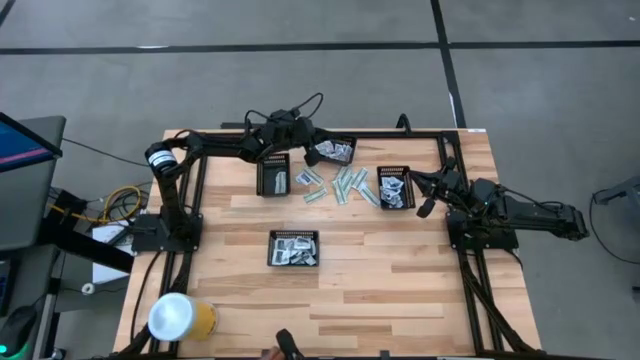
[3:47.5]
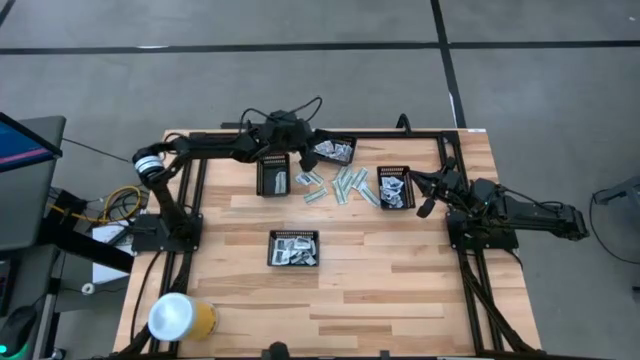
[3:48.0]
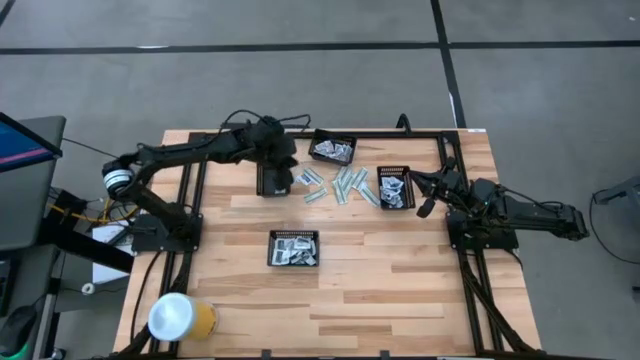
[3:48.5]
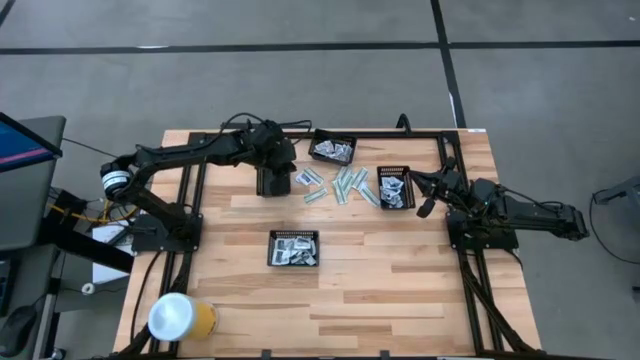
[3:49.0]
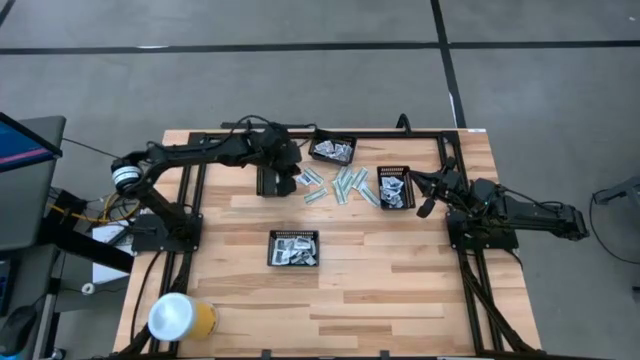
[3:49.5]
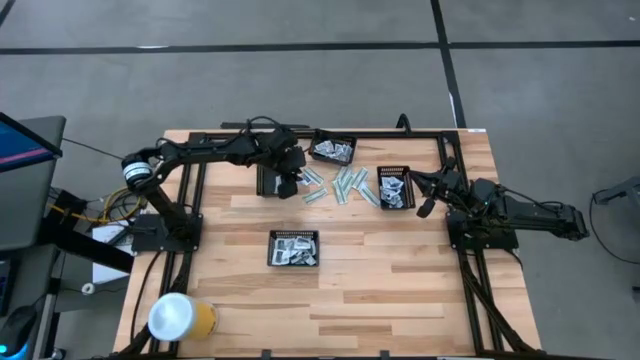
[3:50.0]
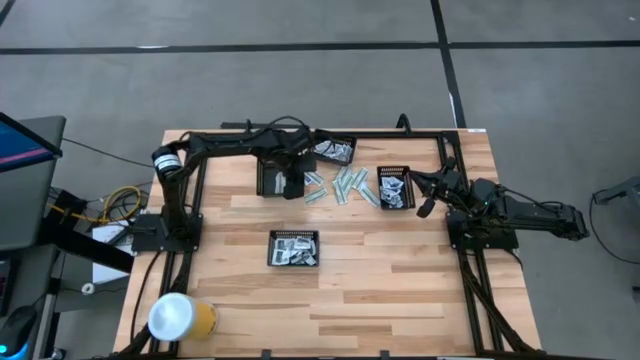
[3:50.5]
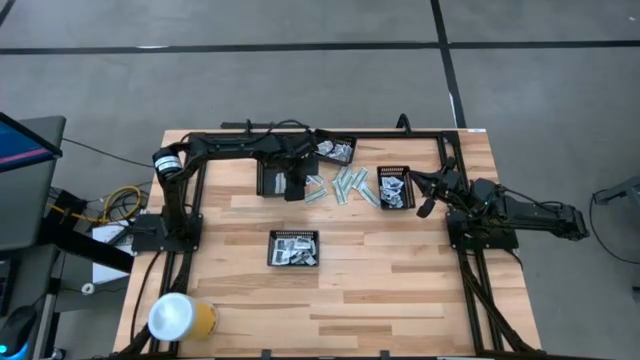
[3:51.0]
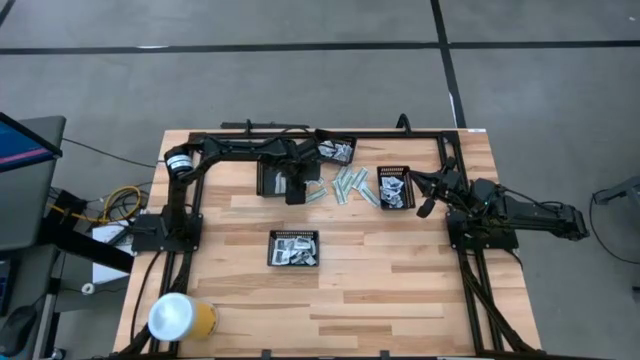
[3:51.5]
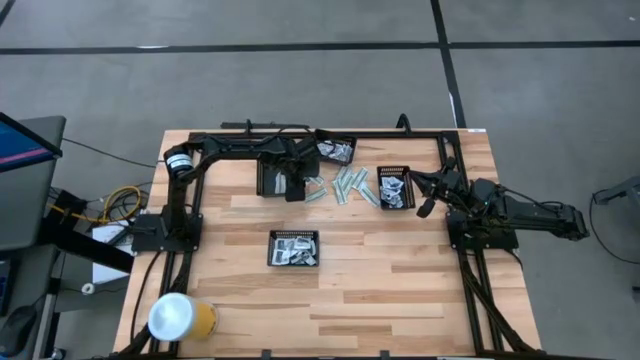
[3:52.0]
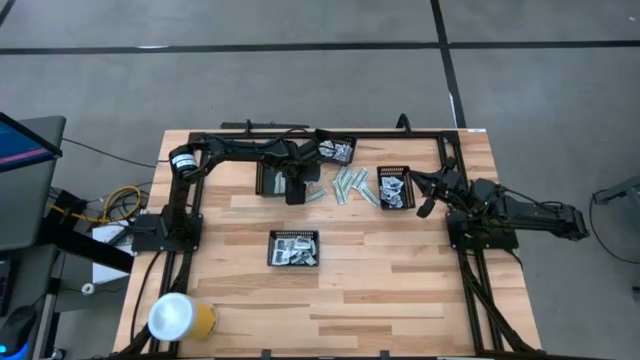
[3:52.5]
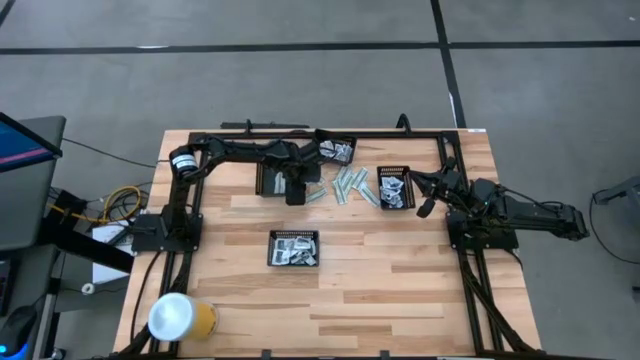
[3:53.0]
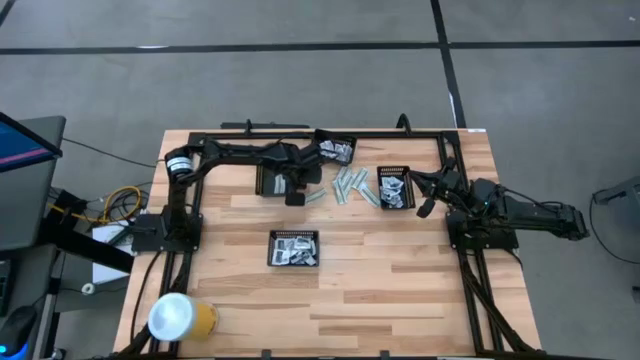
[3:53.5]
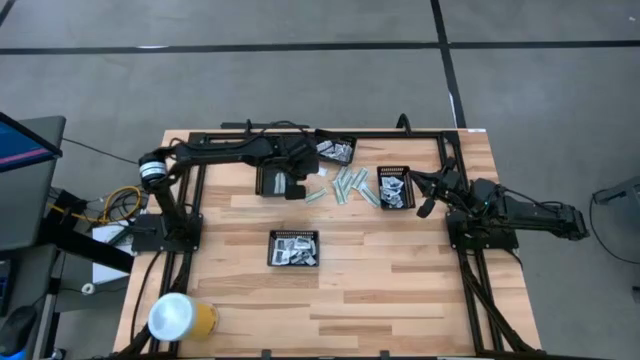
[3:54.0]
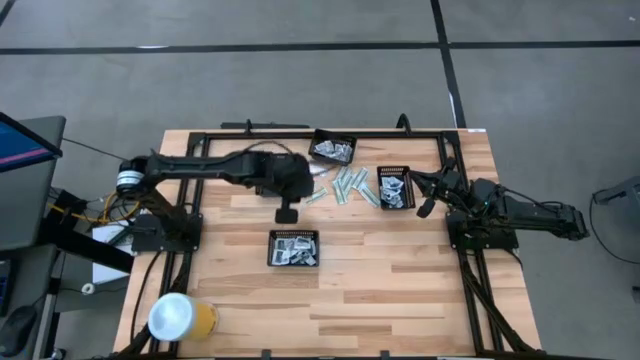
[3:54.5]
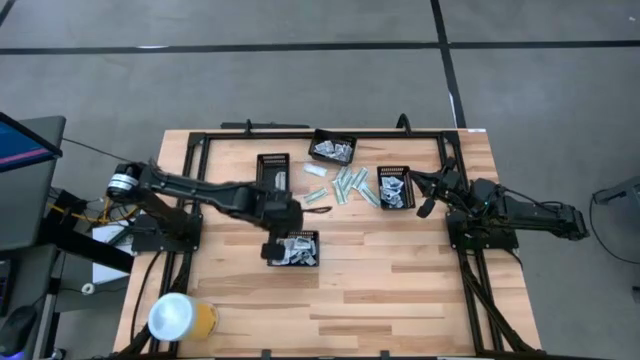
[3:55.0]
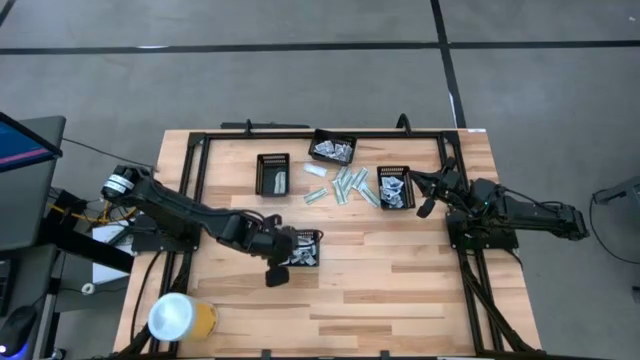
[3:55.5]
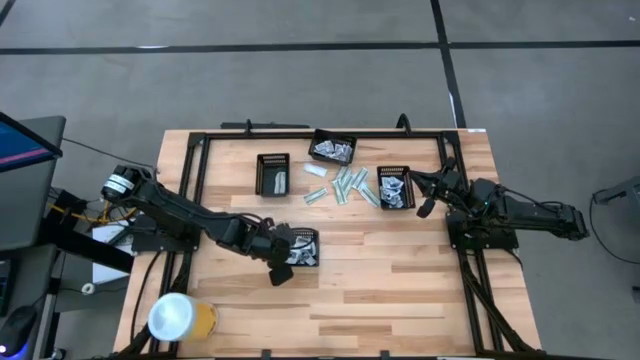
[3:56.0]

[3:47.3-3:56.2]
Task: Pick & Place First Aid Supplies
Put the white towelette pack into the bottom black bin

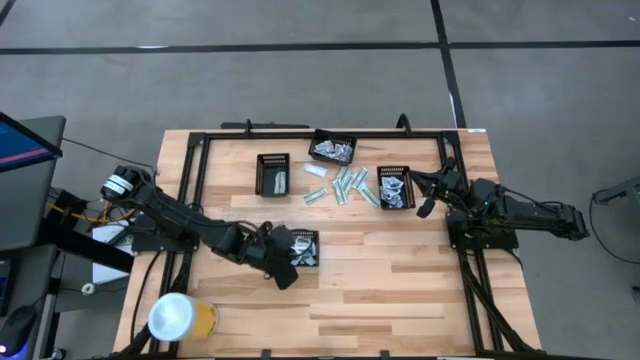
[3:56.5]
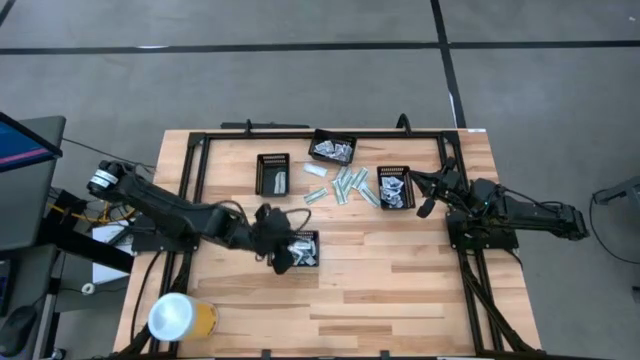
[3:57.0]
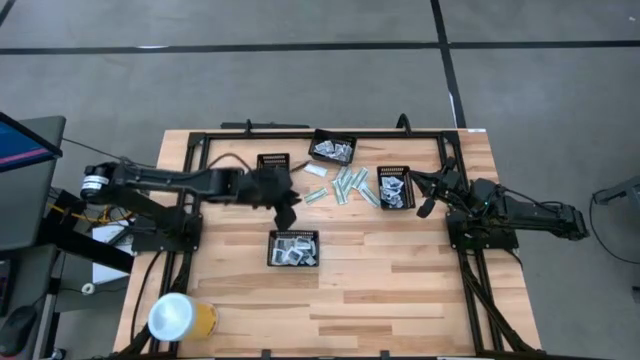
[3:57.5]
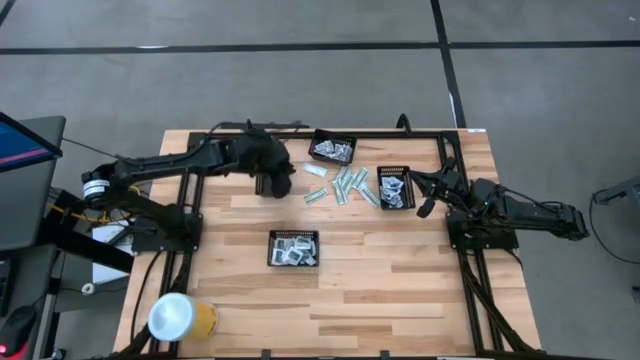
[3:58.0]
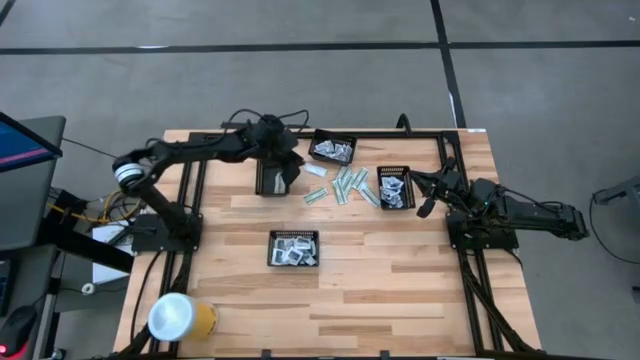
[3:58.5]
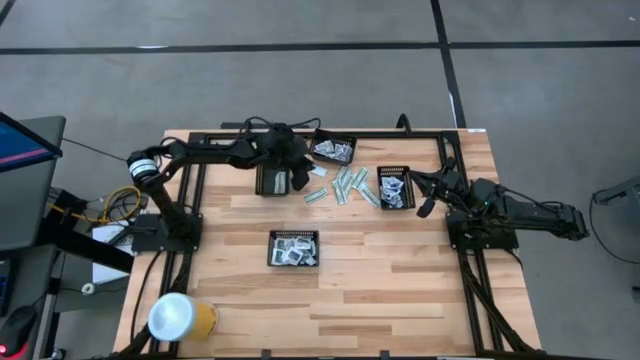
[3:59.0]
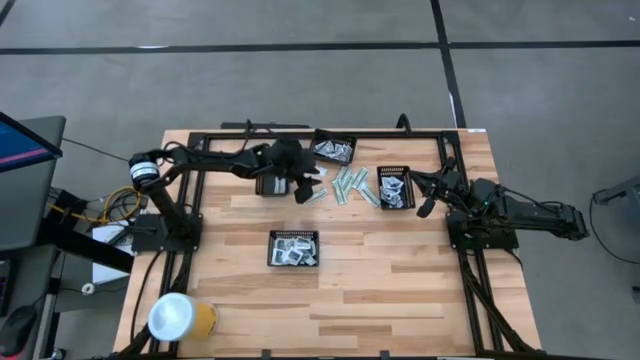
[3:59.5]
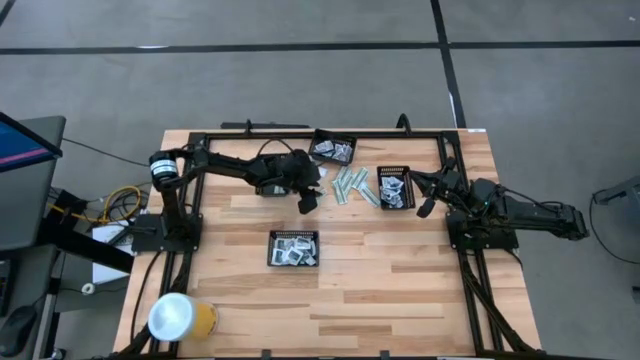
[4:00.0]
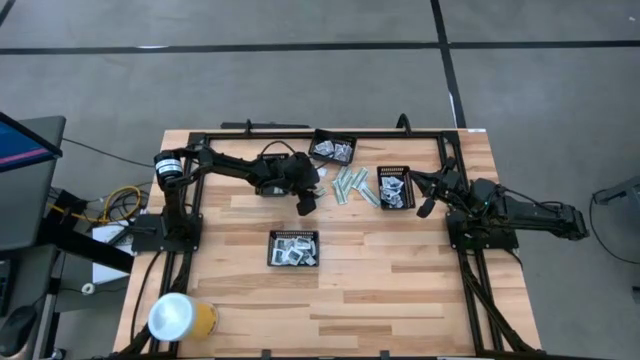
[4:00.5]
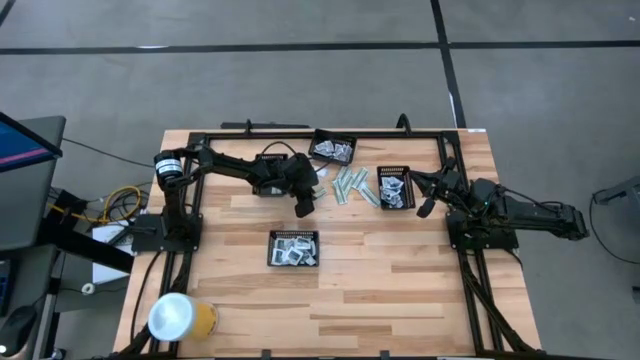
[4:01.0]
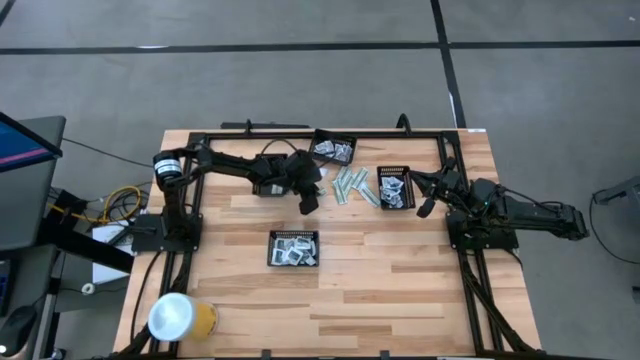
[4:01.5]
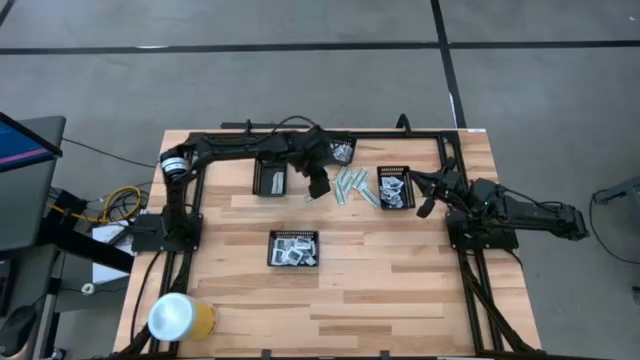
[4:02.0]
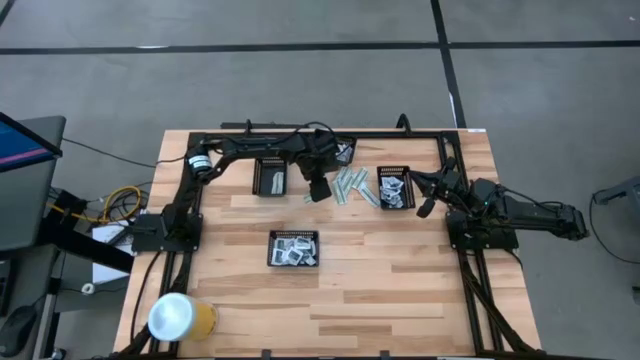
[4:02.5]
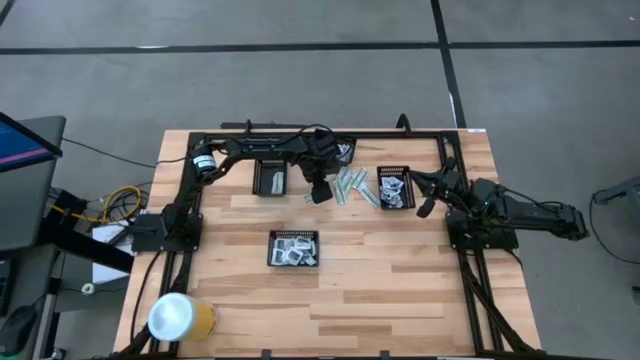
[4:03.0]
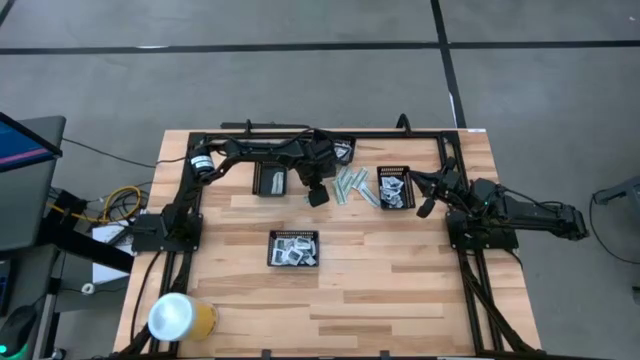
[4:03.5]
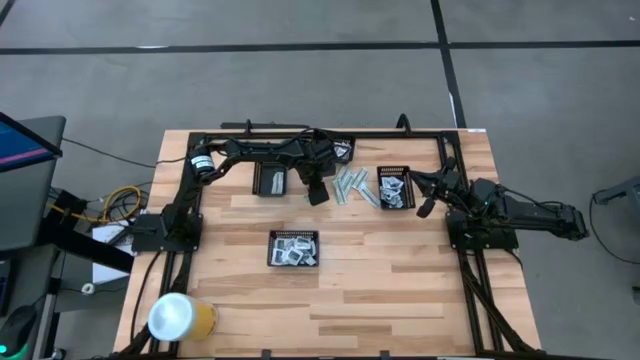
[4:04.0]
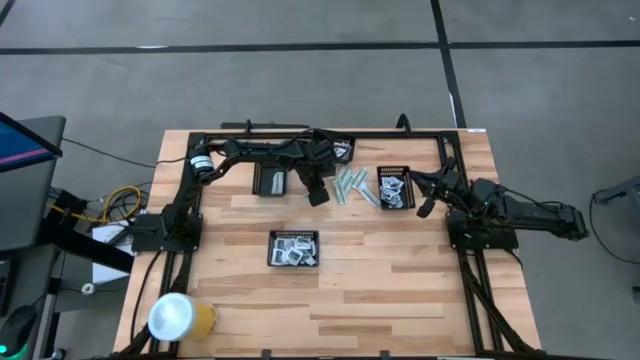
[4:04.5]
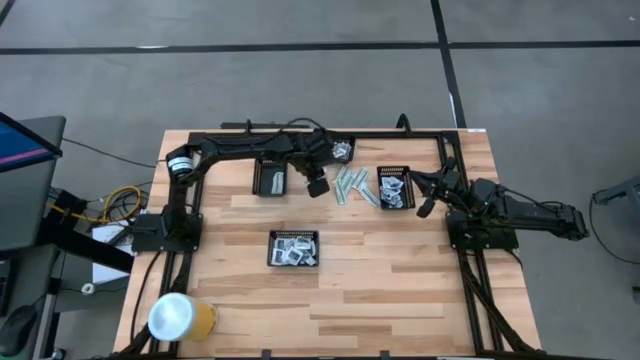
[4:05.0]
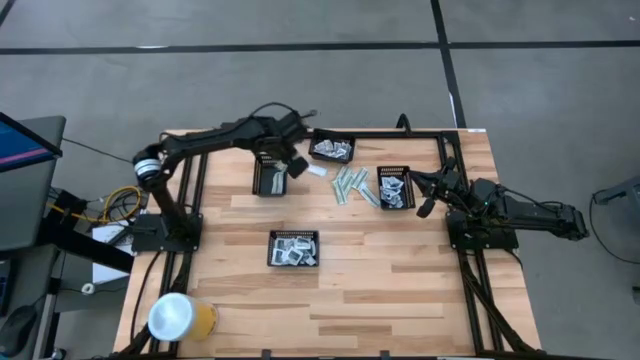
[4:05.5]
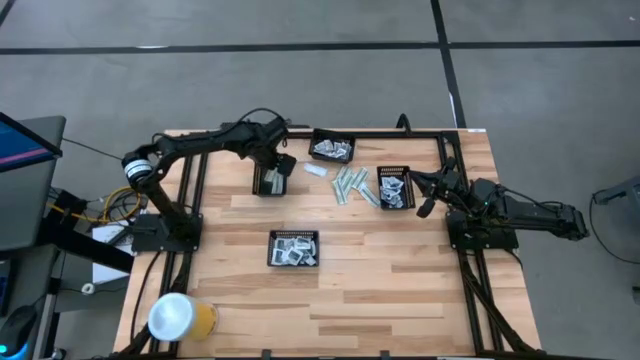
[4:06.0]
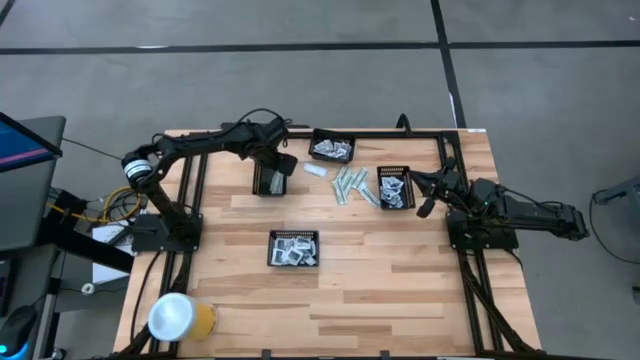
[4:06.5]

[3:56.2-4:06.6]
Put the green bandage into the left black bin

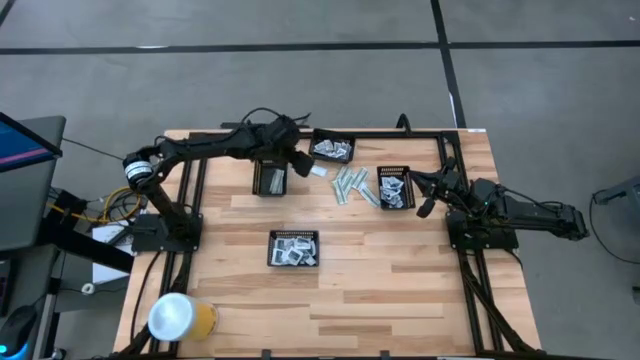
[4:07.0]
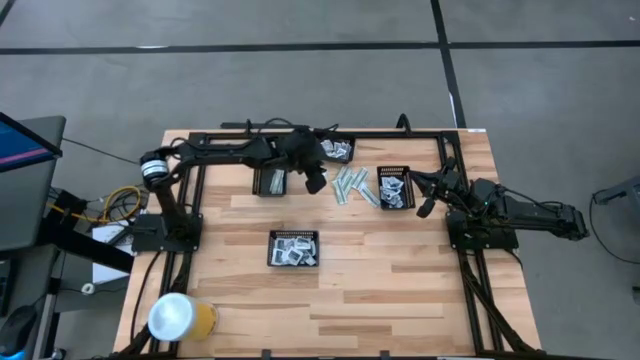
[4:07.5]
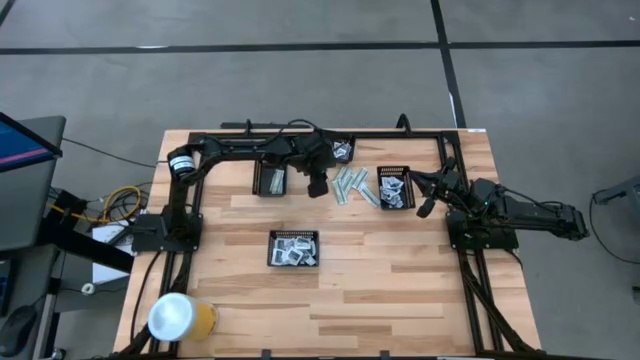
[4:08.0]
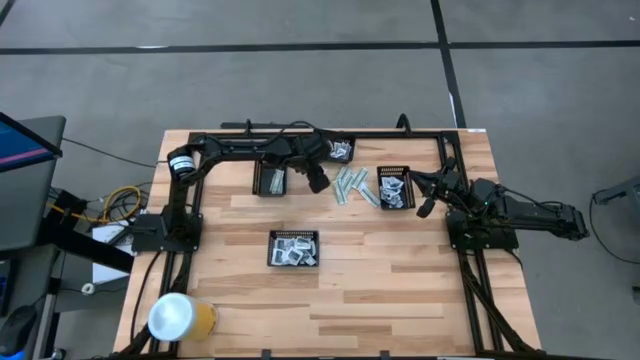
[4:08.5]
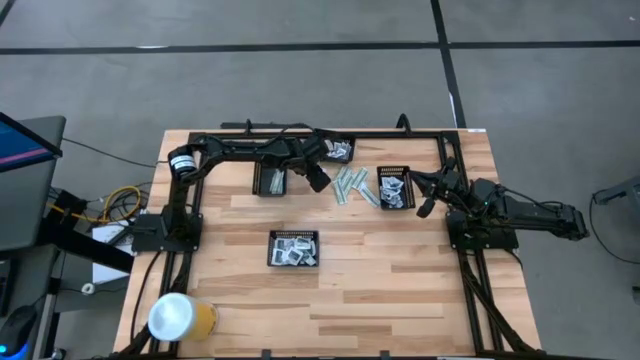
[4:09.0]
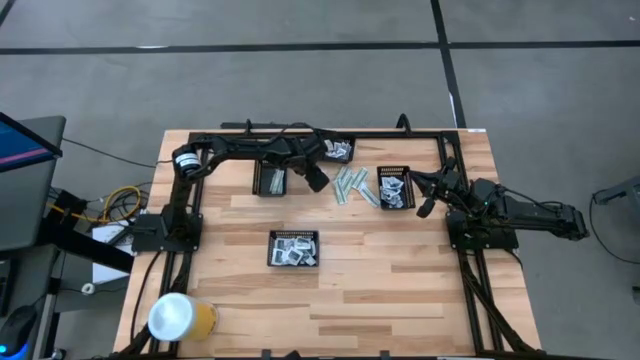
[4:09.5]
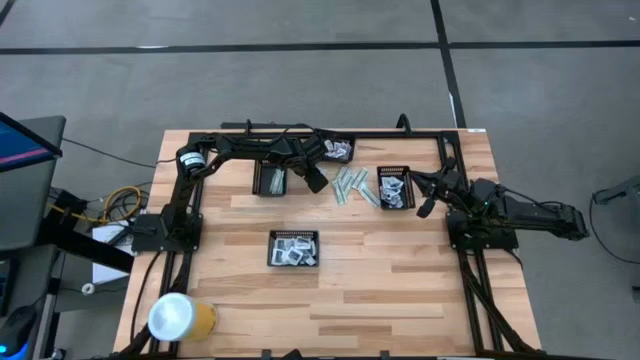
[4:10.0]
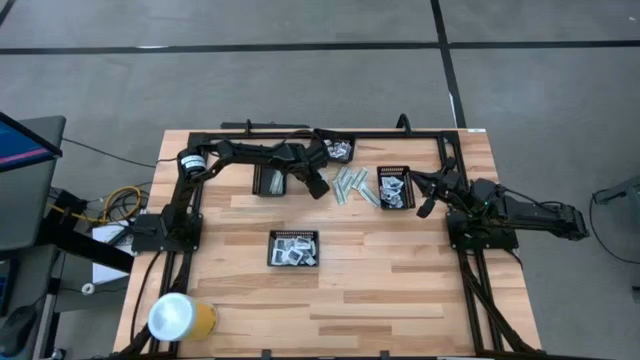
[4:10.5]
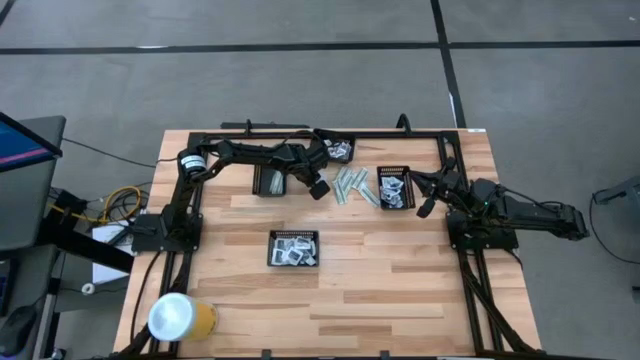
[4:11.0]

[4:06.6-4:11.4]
Put the green bandage into the left black bin
